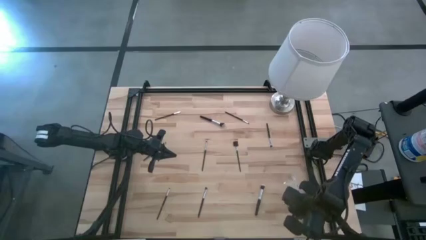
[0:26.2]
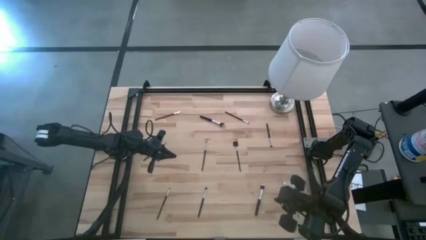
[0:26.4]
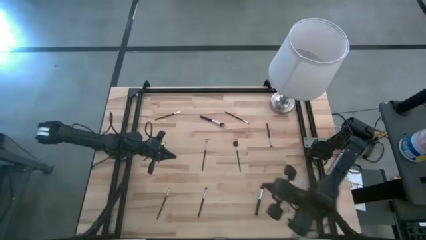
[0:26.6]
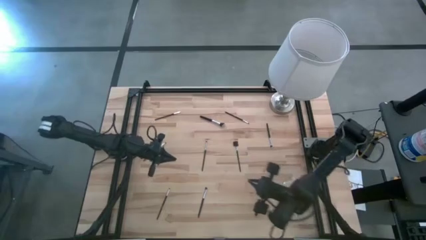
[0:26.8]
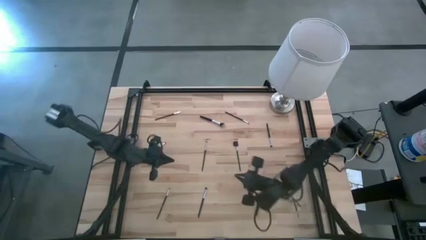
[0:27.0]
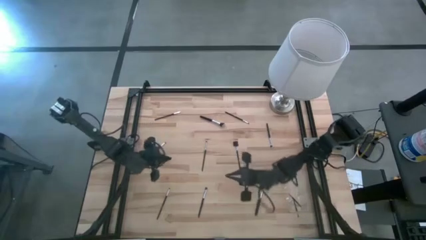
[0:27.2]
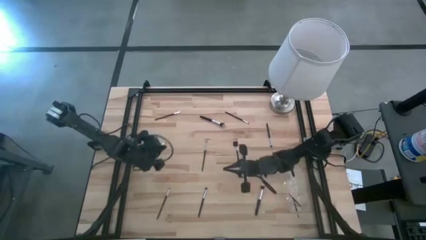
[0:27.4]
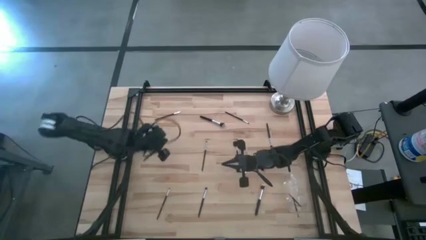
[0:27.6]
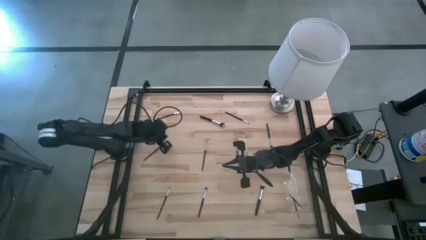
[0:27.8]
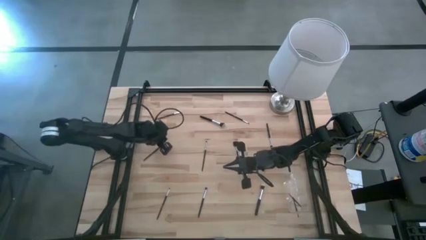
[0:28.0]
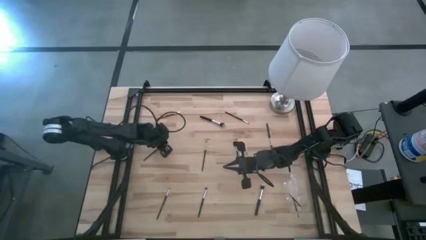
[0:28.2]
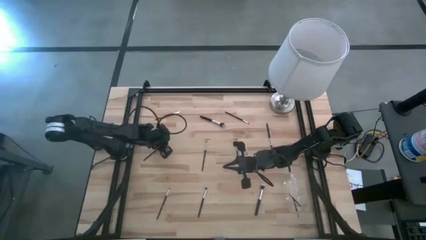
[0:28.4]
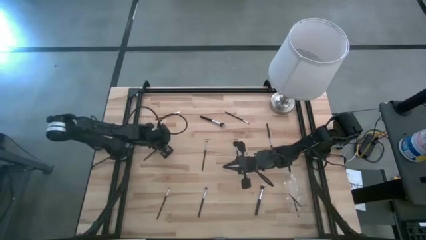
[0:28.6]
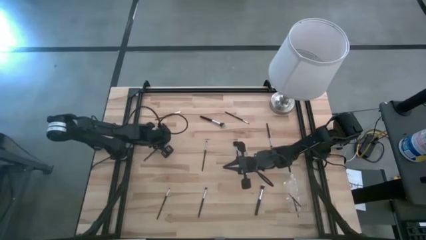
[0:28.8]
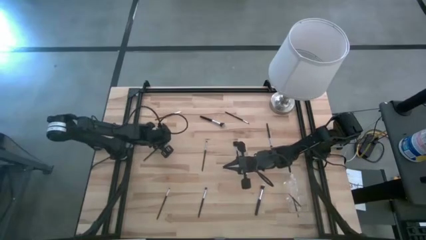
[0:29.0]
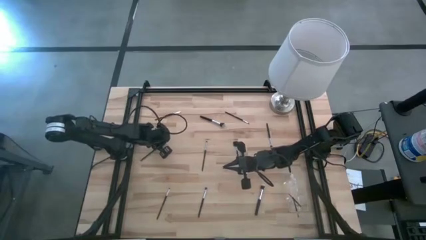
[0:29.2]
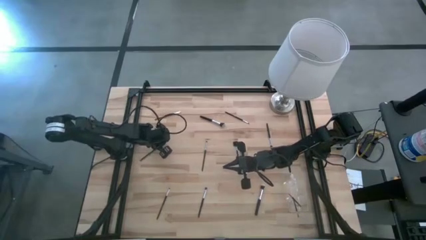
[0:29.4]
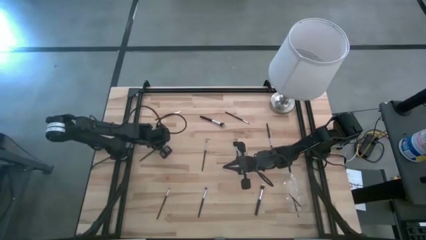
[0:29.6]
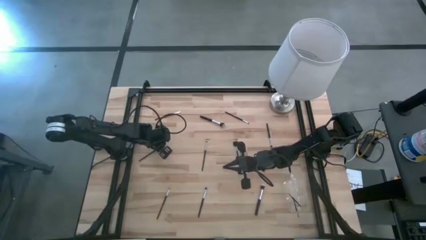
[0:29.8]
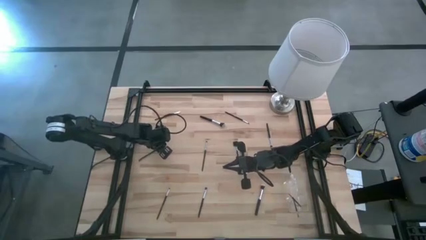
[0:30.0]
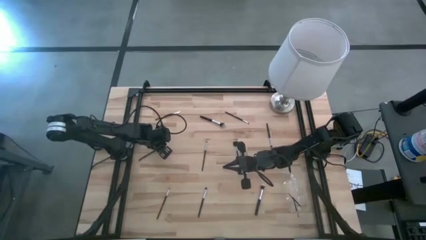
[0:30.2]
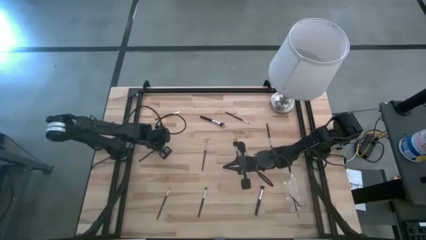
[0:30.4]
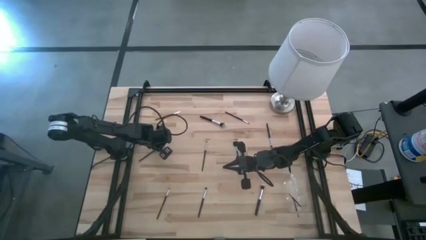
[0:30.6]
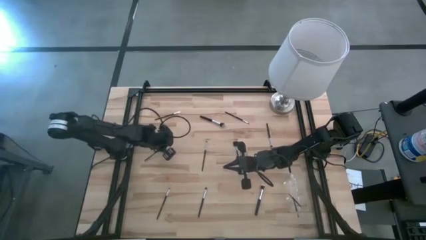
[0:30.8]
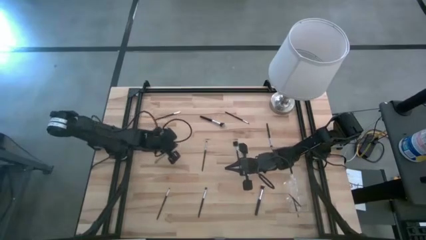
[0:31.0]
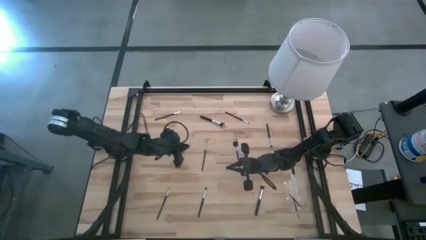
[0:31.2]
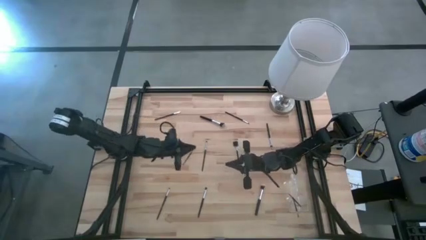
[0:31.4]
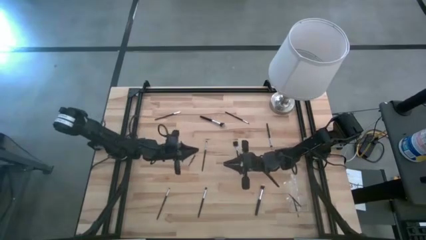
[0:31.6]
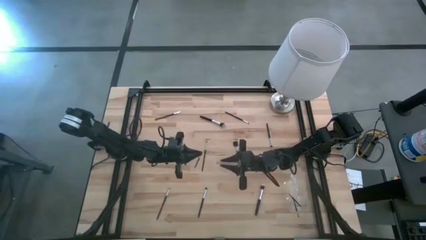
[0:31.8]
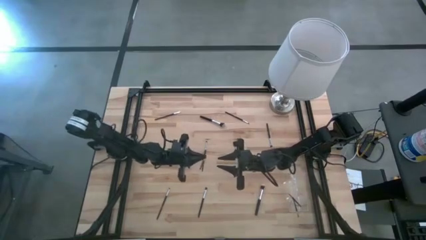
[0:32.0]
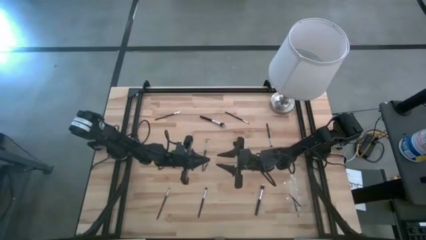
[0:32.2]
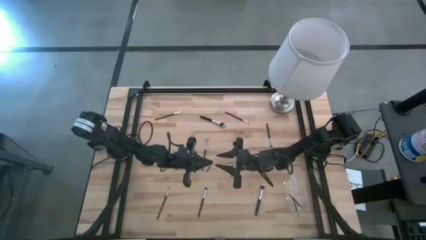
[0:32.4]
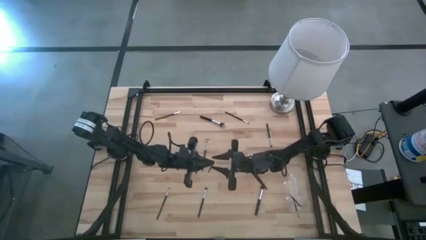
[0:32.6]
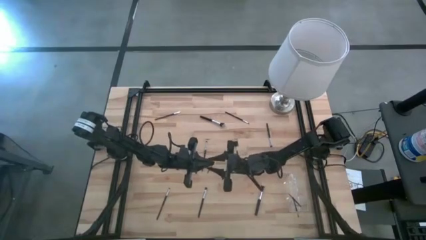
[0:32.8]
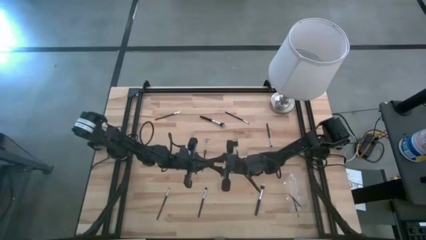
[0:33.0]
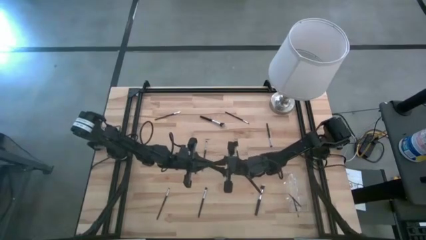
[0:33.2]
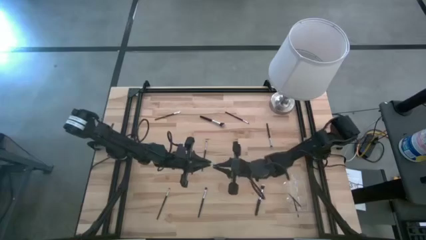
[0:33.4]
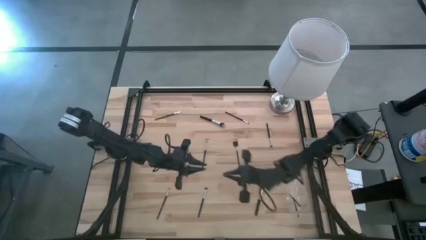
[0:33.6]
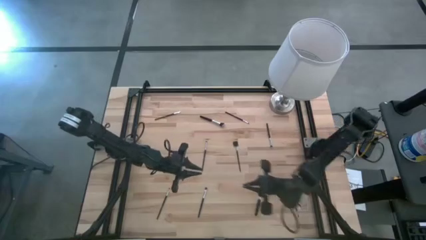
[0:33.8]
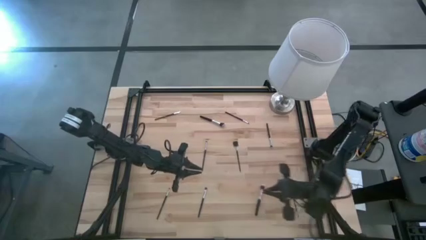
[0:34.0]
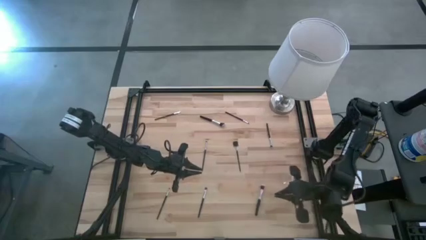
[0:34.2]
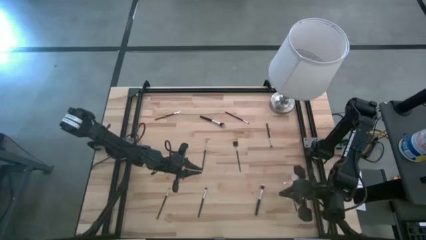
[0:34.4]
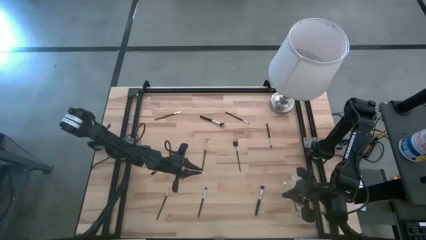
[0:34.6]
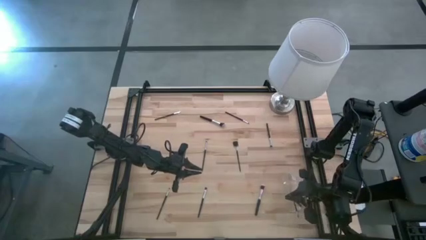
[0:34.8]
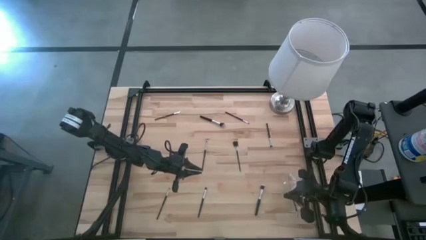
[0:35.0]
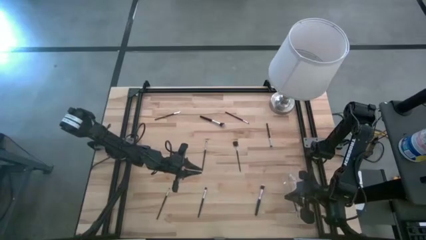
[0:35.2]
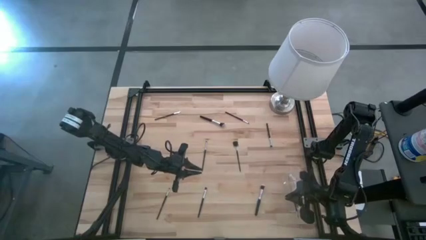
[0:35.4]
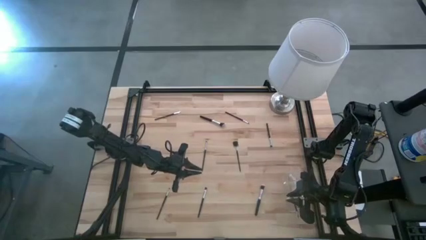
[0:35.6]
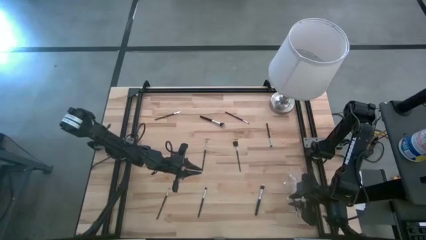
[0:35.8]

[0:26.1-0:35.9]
Task: Put items in baskets/containers
Put the foundation brush into the transparent organizer
